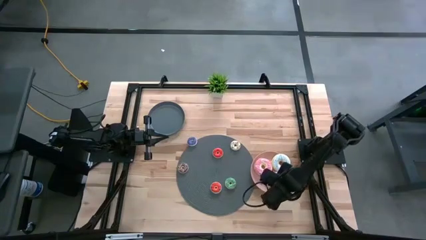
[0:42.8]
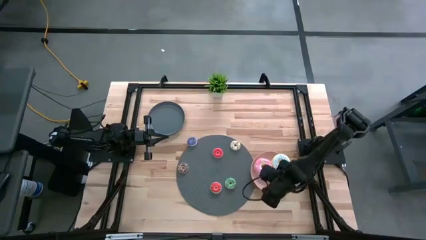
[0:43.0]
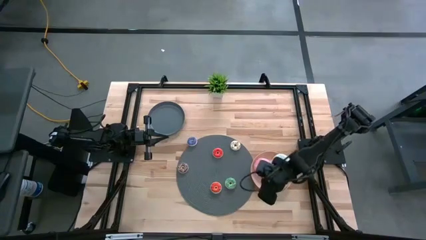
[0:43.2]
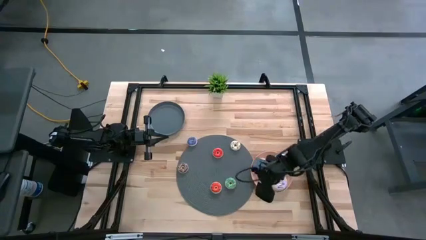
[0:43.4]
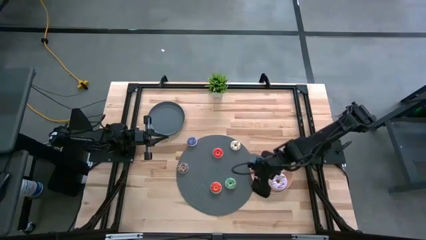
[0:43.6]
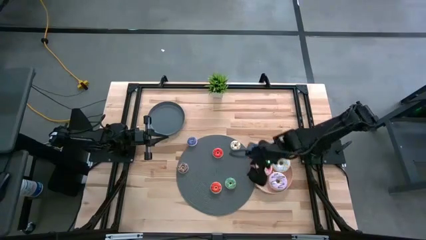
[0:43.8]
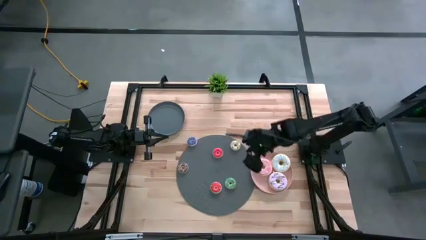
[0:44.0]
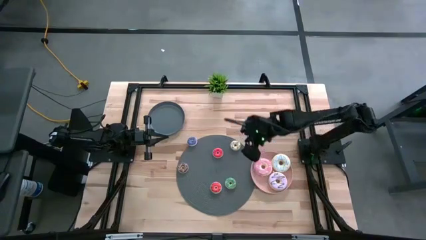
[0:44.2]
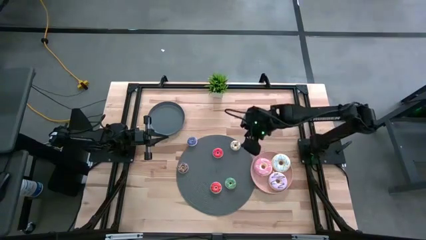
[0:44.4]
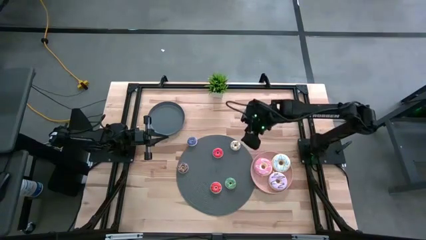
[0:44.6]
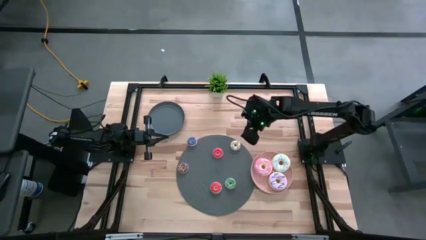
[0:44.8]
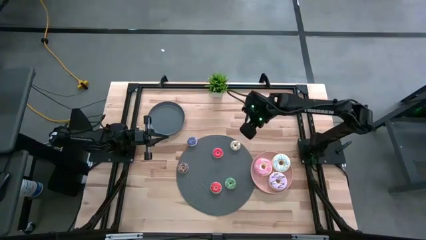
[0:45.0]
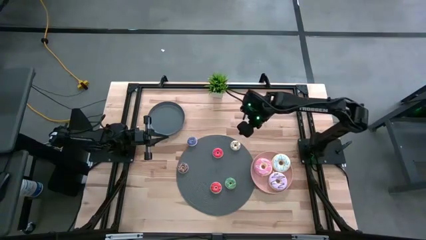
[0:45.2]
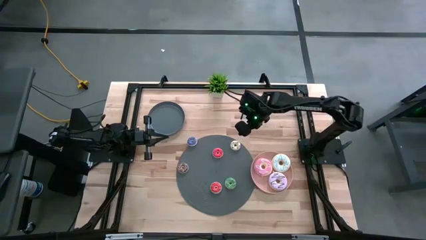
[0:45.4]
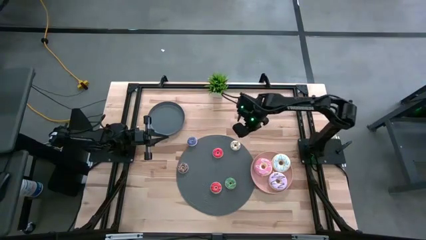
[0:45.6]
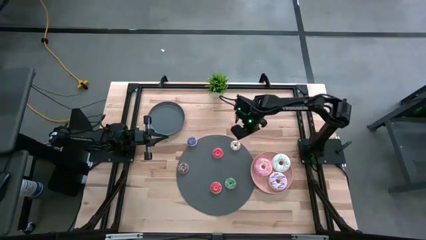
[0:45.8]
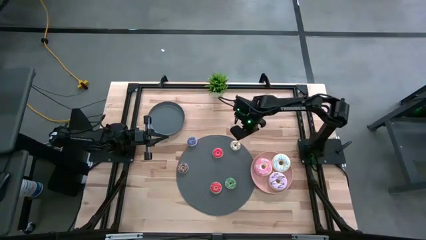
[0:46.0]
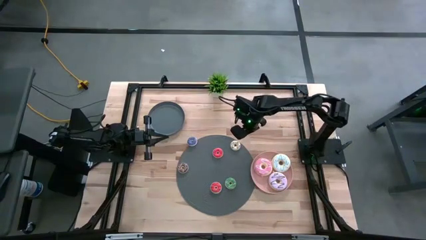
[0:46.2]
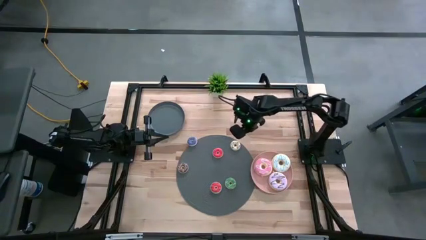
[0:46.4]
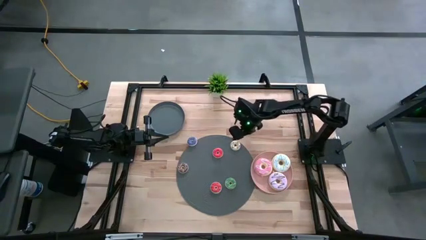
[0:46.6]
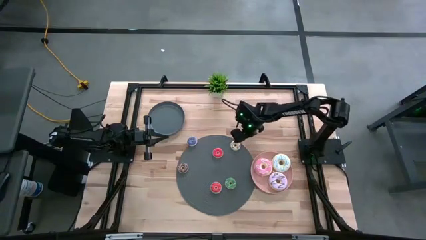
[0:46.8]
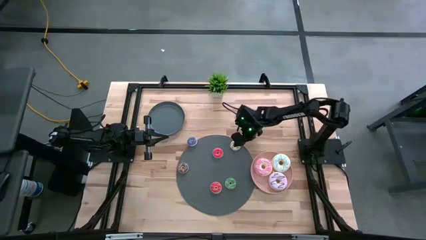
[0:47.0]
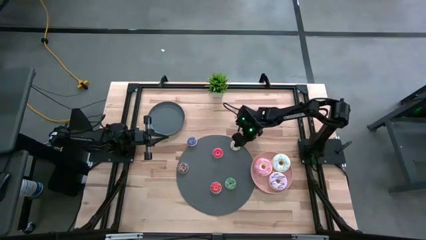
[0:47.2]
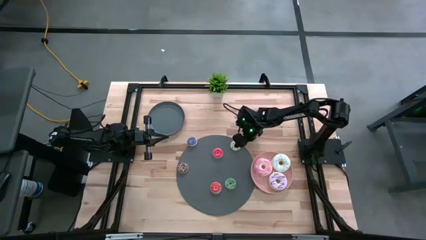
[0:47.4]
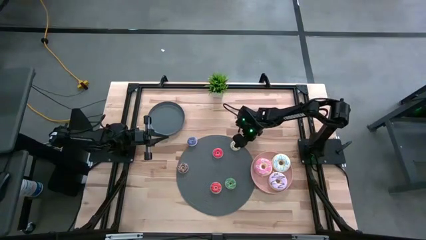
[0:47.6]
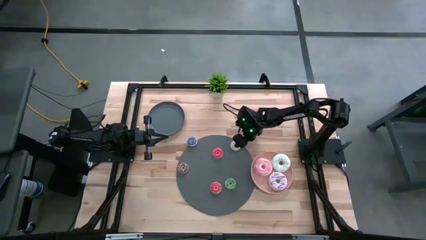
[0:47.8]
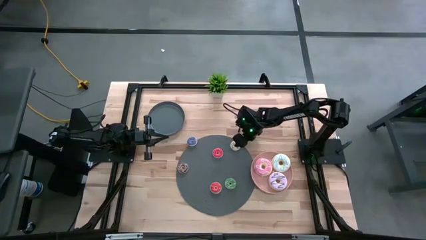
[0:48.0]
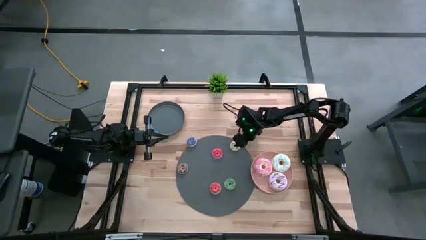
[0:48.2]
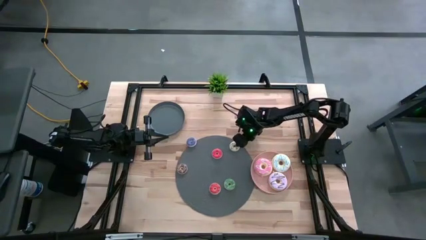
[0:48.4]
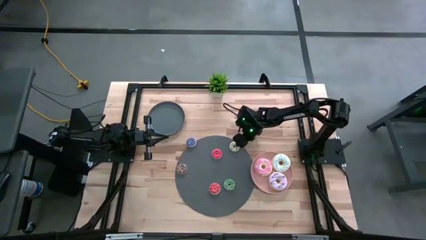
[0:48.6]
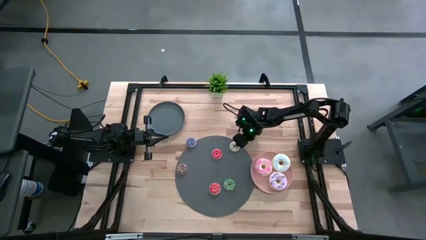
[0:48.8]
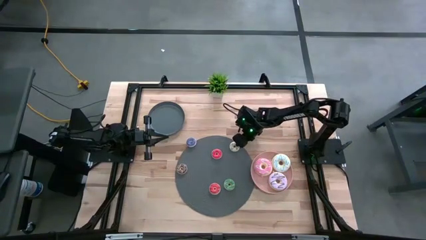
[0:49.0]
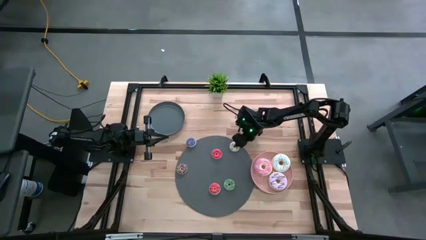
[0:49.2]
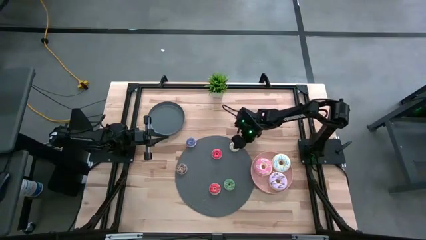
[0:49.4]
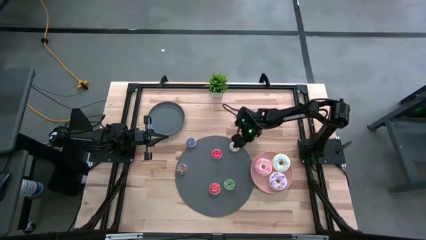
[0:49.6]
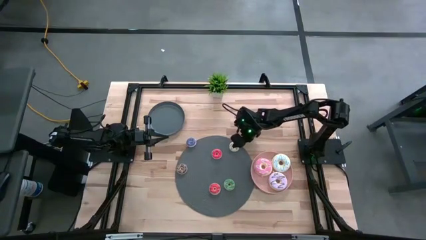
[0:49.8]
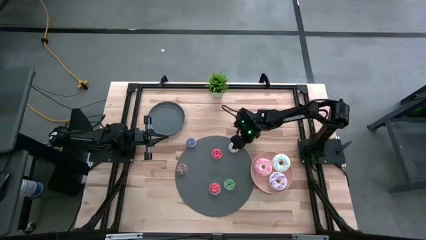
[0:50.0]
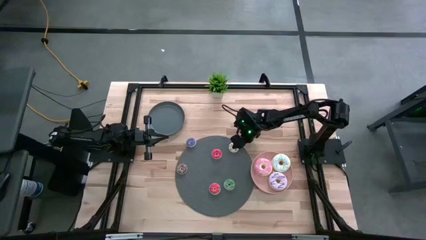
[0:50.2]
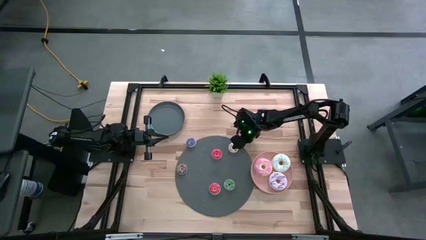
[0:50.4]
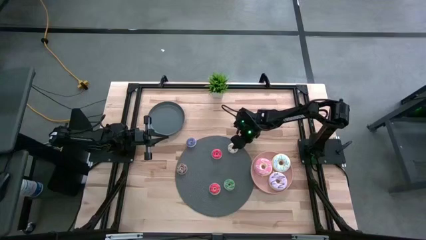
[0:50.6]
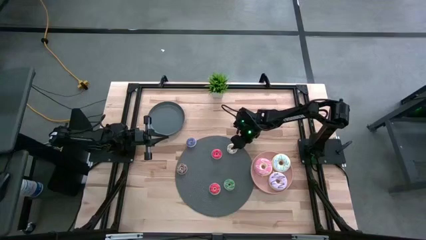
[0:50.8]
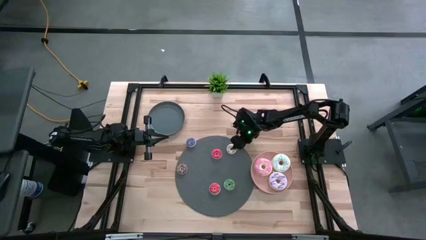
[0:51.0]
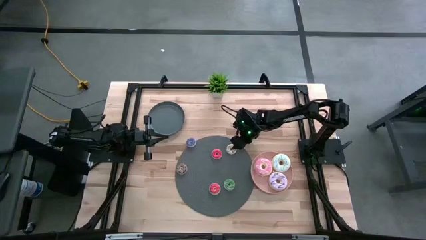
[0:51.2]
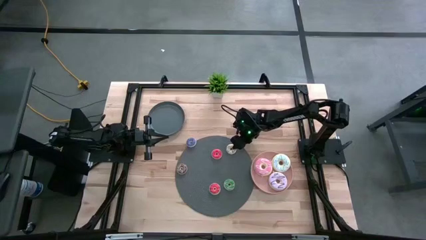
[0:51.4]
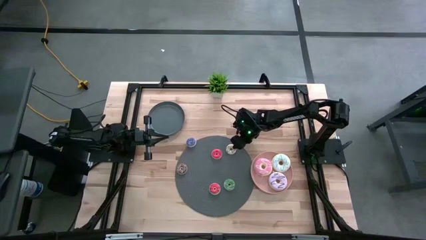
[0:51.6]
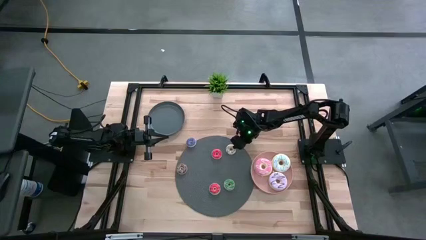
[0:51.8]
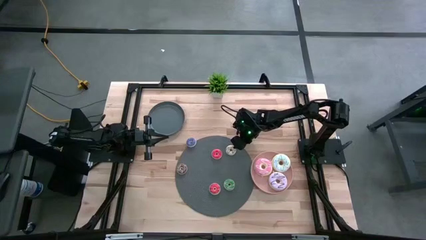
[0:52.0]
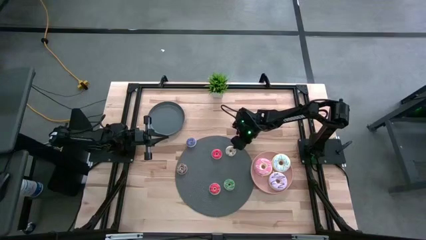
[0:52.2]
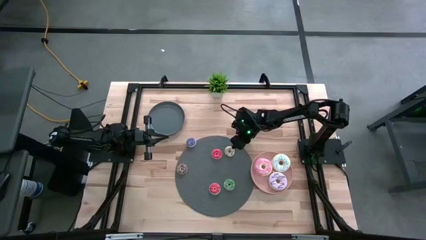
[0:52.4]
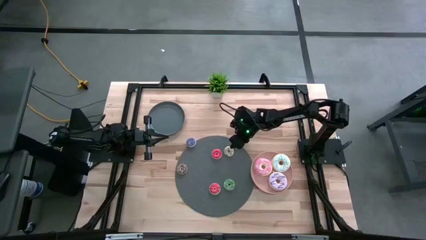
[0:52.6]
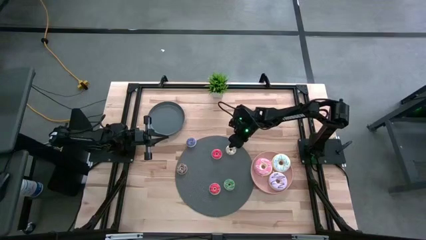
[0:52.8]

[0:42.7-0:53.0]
Task: Pick & Place donuts
Put the small white donut on the gray plate

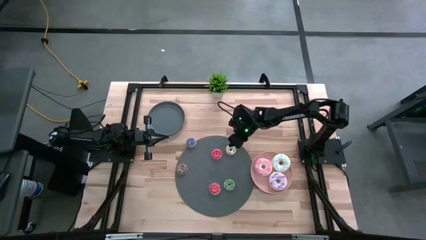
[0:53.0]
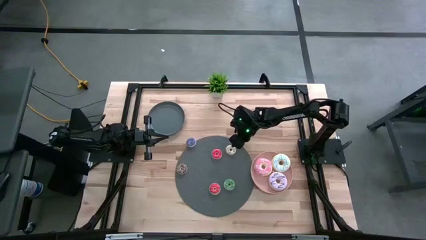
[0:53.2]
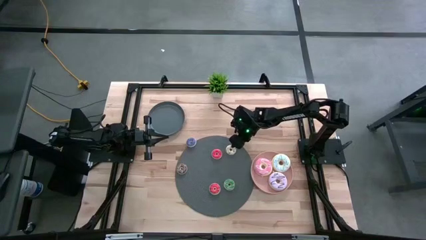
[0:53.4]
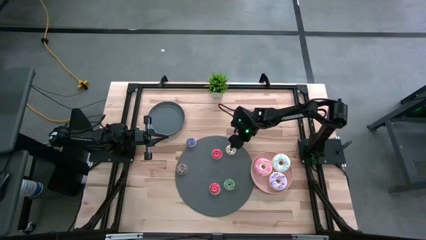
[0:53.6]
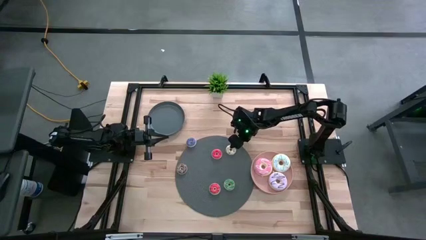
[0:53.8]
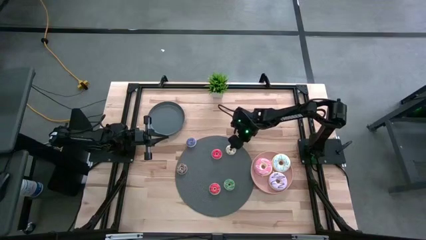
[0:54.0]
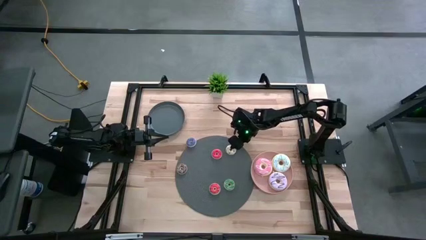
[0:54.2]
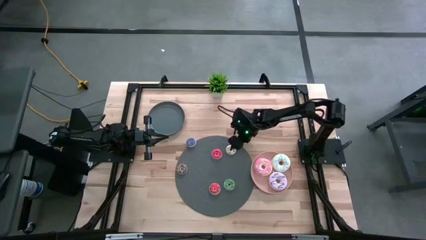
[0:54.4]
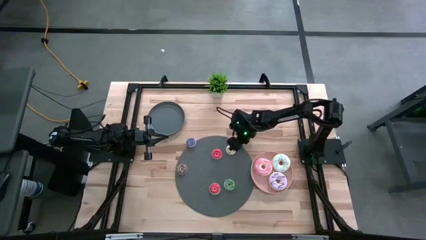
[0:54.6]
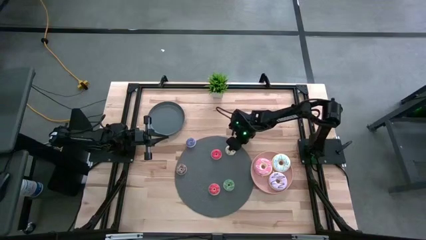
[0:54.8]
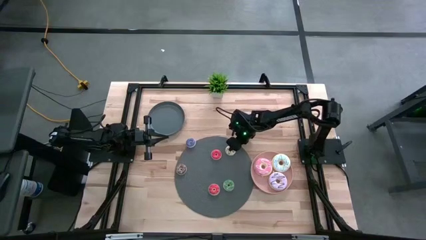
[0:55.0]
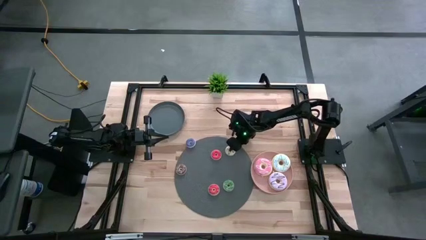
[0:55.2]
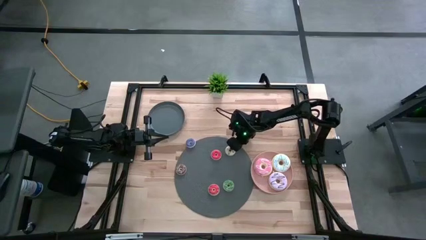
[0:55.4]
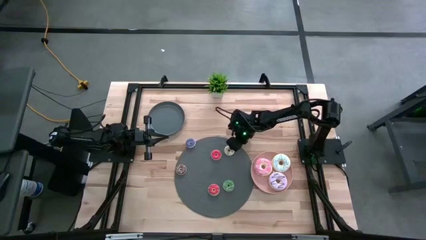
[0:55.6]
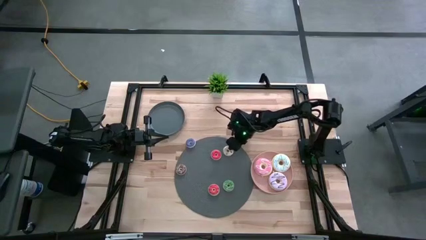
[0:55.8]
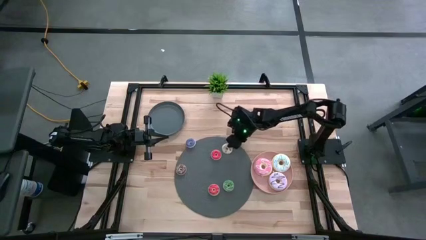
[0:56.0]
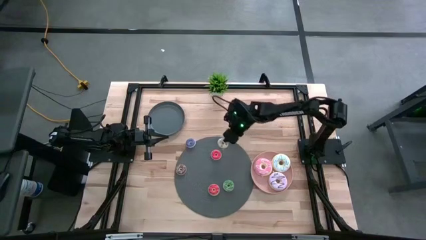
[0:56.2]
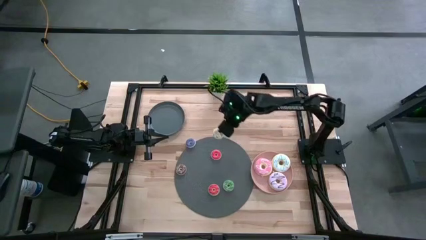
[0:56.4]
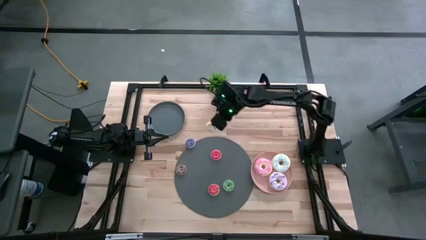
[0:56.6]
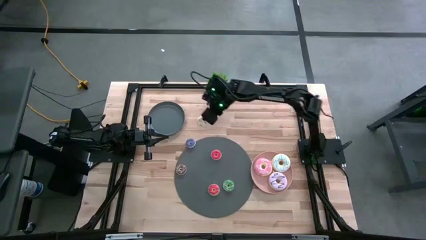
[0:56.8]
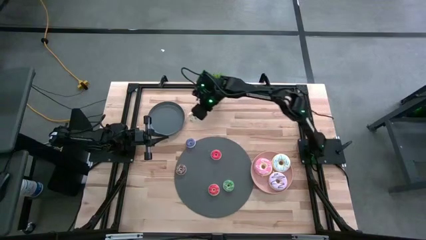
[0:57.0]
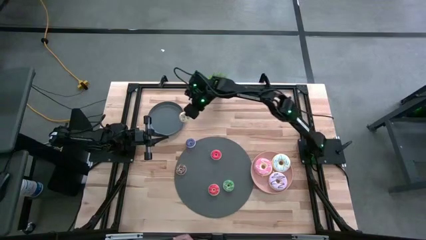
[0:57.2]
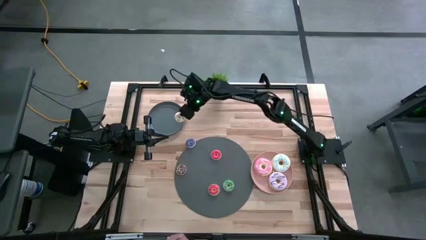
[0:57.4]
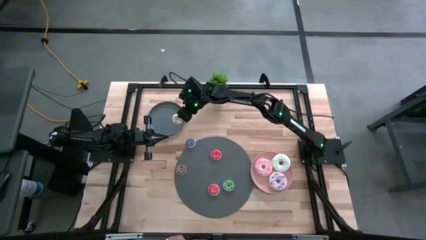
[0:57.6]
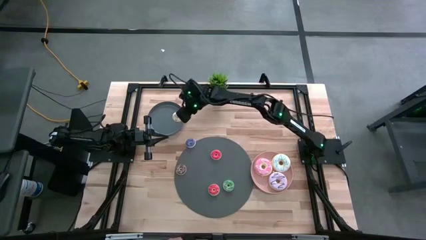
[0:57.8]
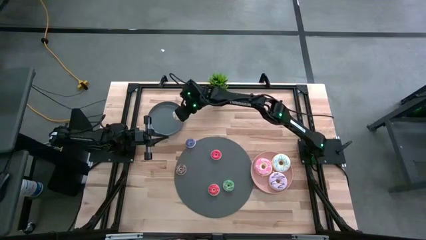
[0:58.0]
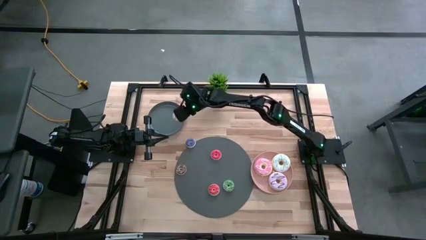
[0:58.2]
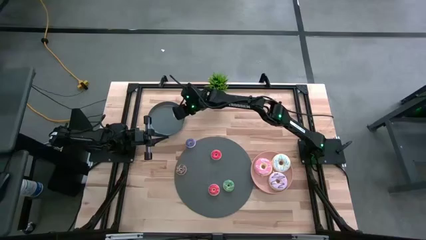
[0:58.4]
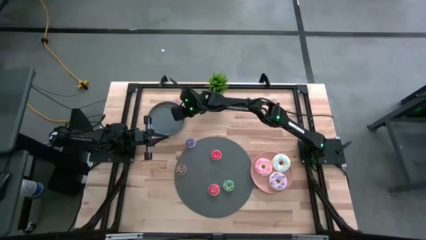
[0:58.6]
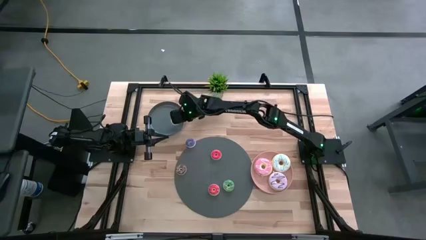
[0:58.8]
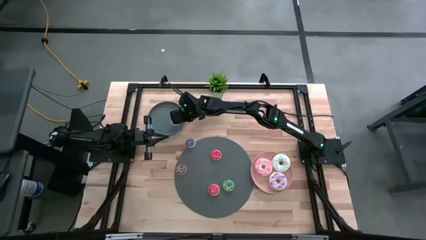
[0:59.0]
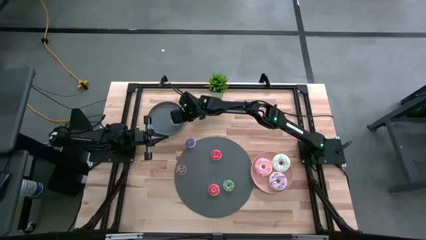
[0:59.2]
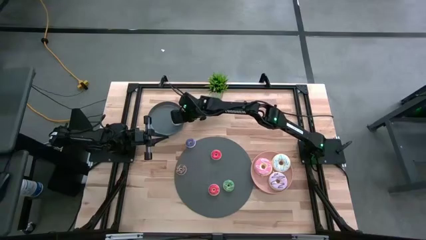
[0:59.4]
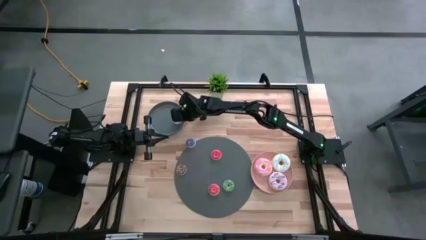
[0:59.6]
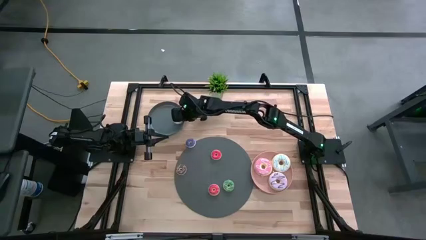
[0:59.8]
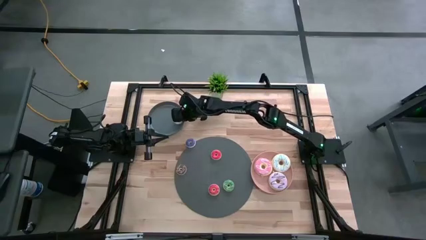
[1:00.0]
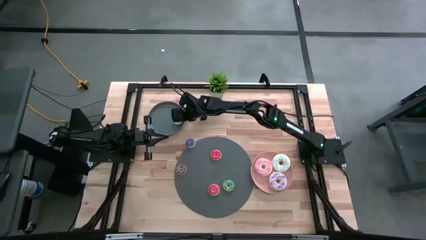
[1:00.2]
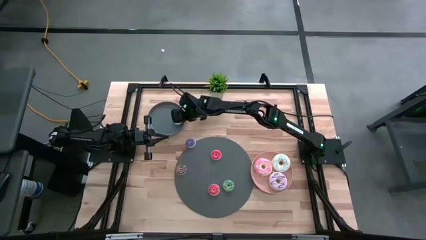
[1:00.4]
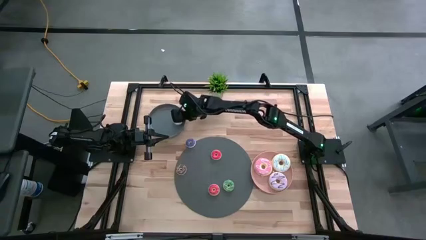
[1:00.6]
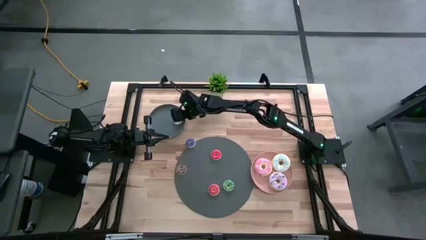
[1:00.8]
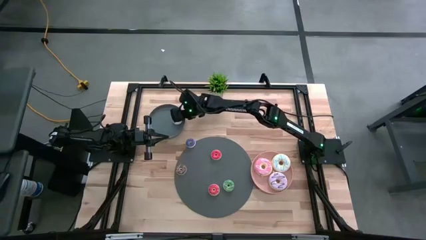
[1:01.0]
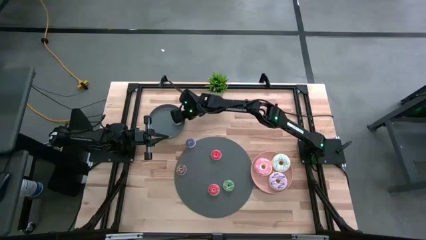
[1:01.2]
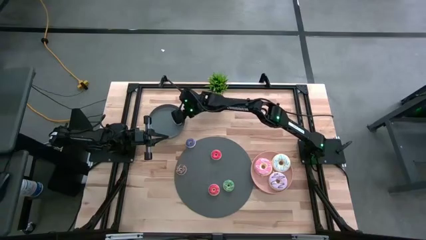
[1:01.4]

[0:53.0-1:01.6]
Put the small white donut on the gray plate
